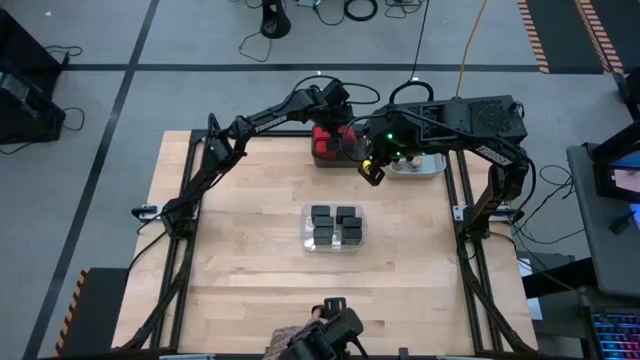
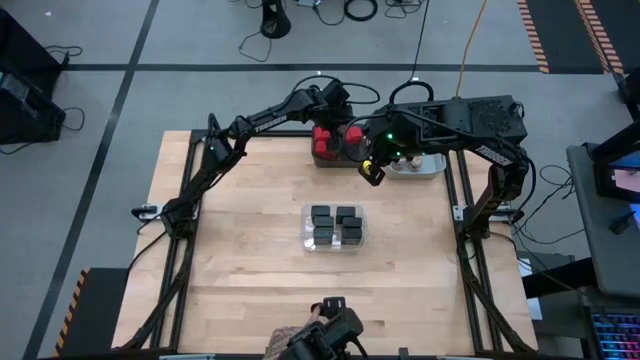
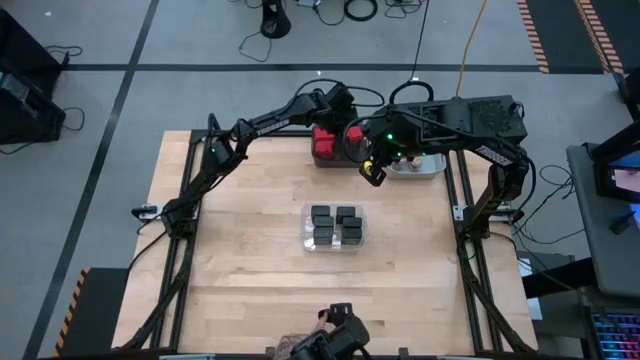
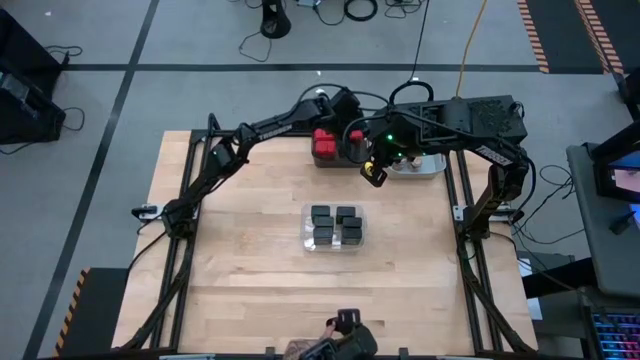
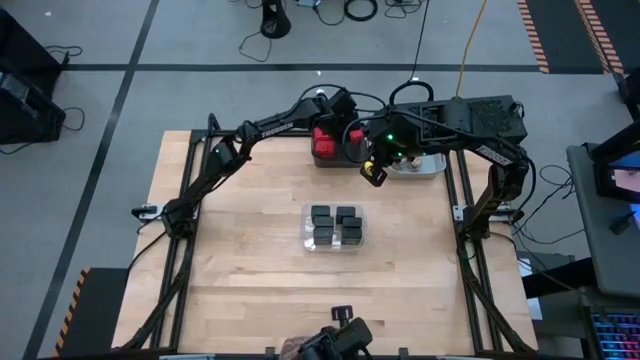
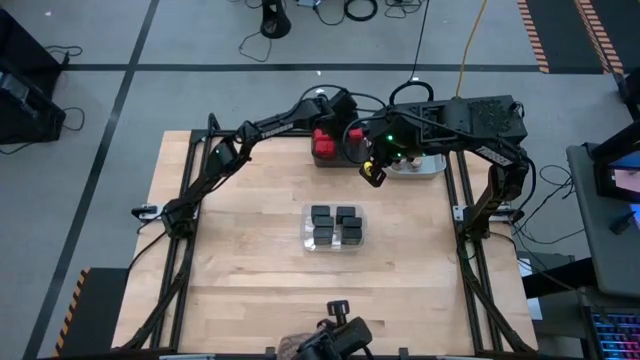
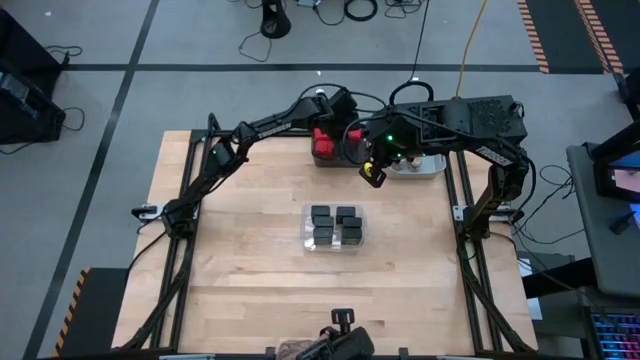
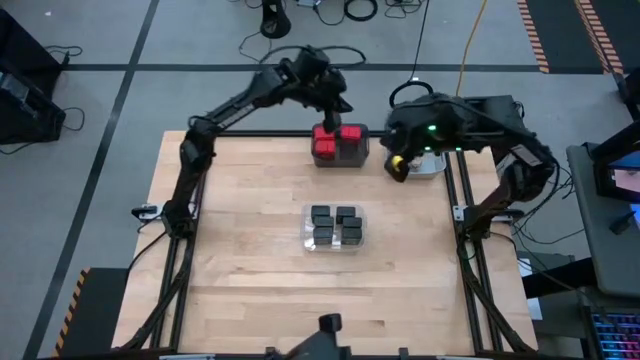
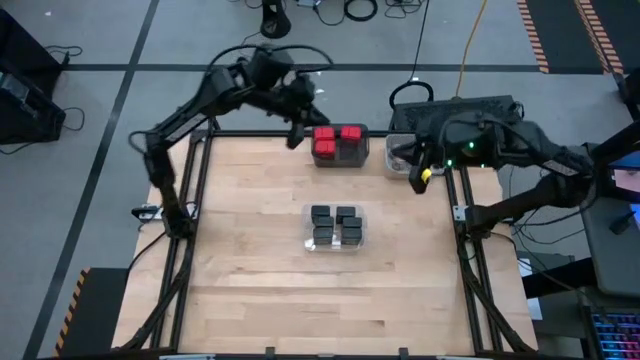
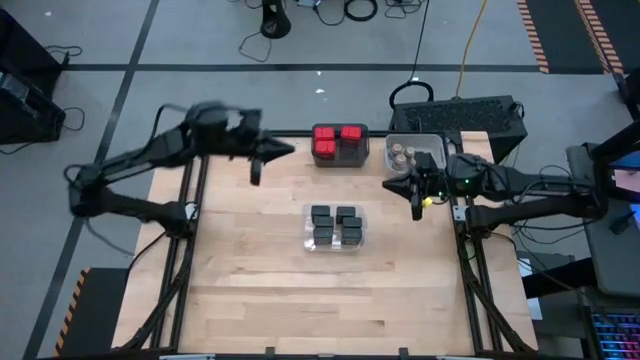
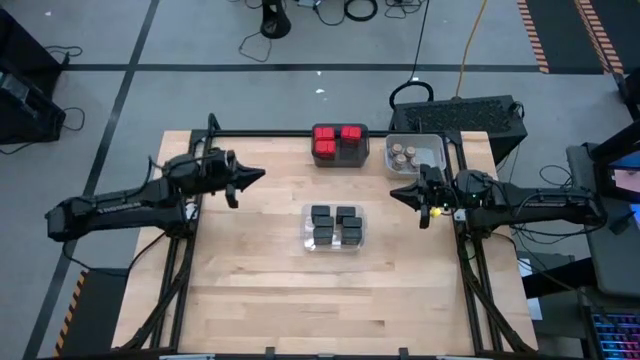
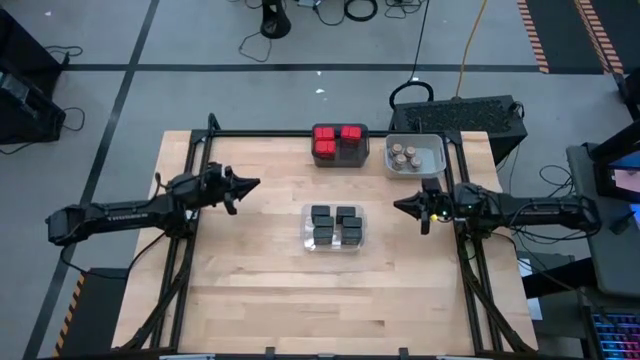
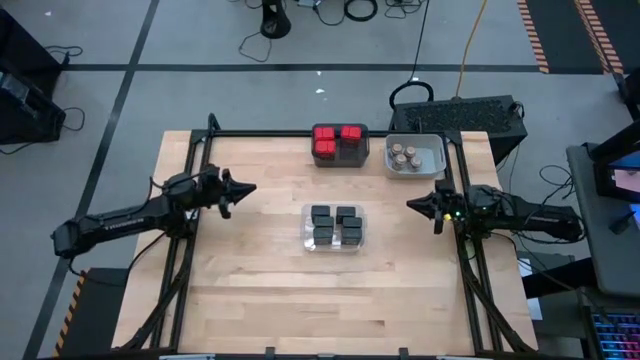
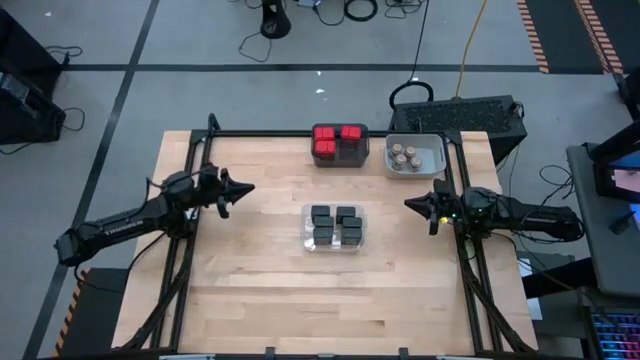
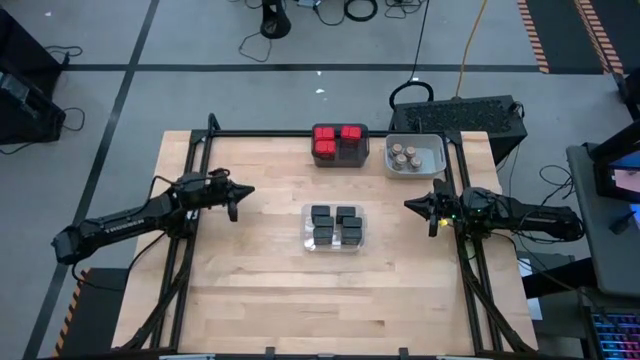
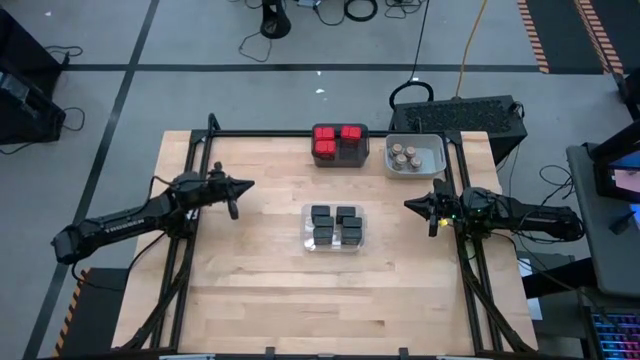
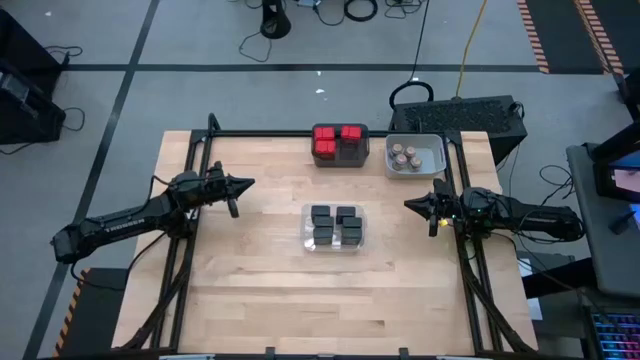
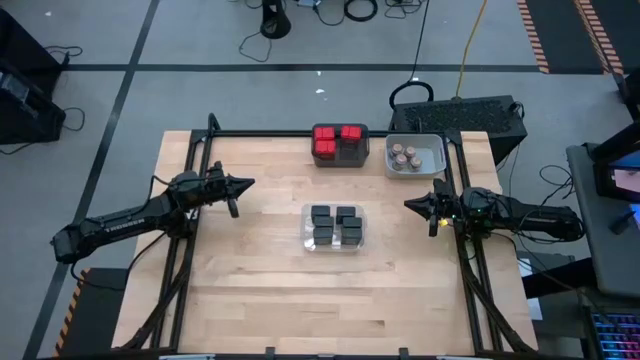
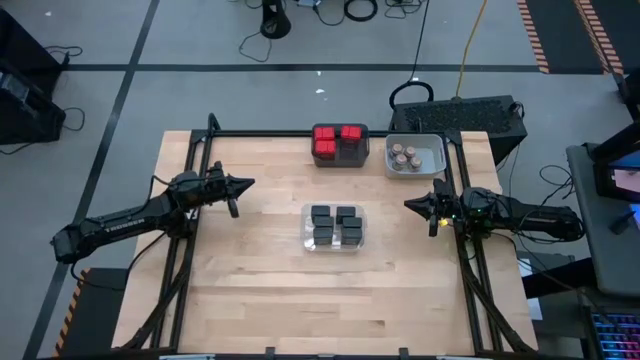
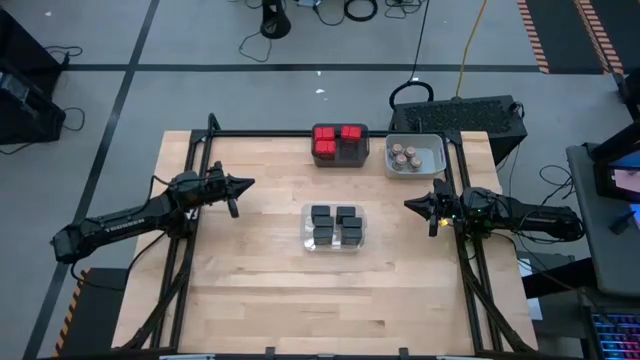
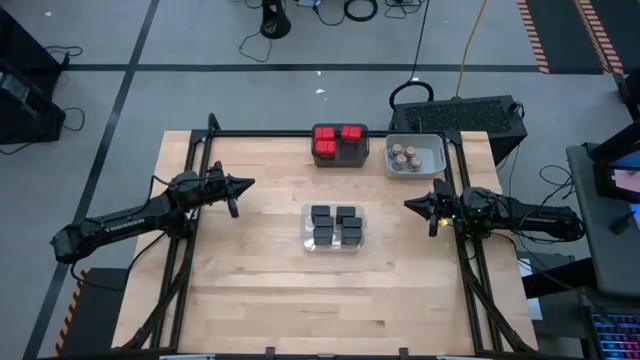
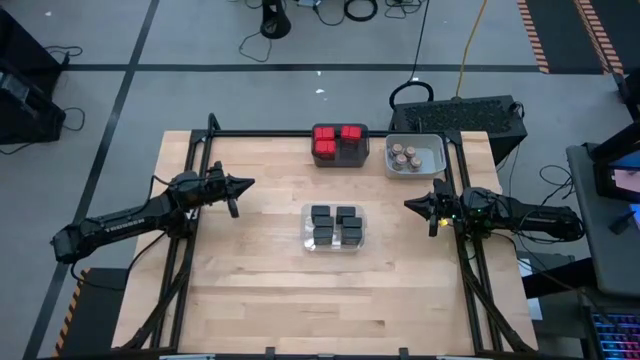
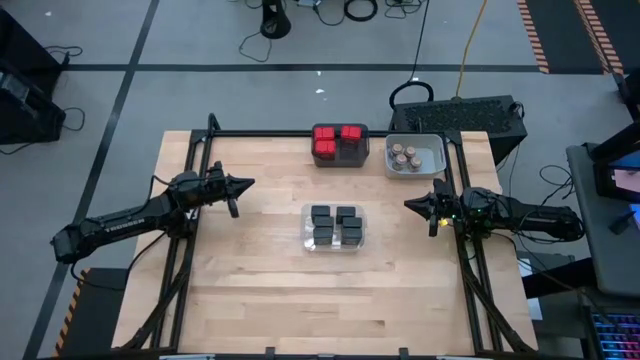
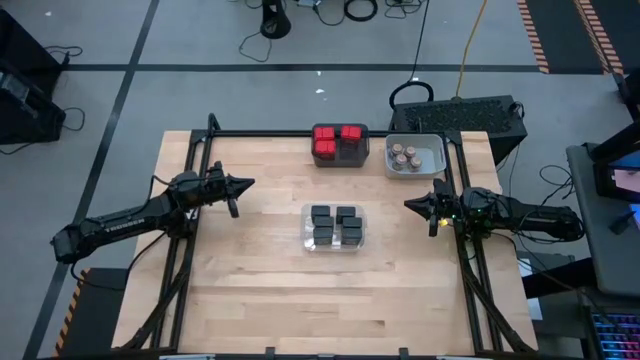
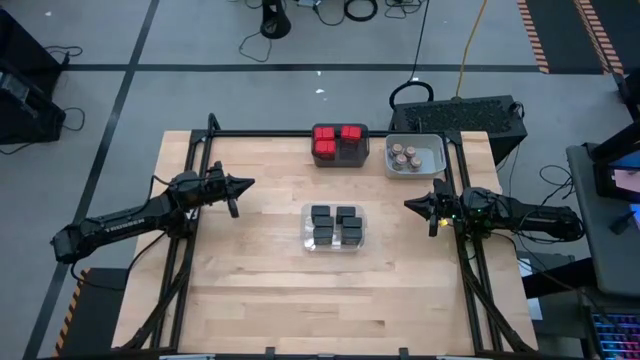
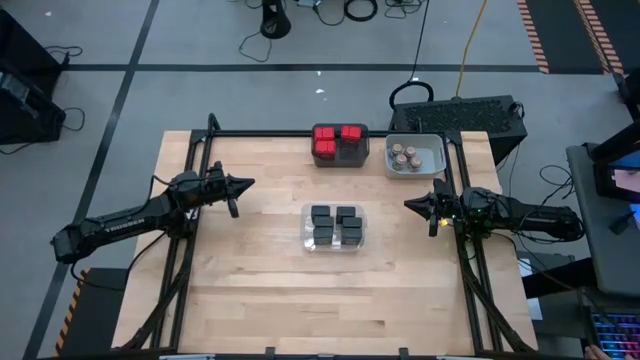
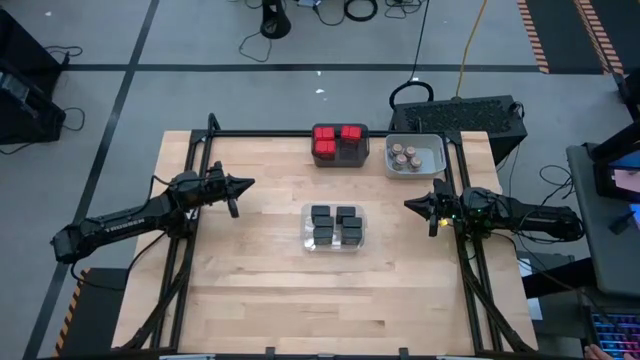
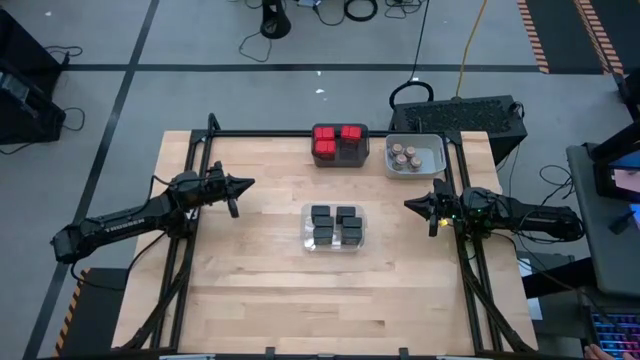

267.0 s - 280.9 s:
Task: Sort spices by type
Return to Home Position

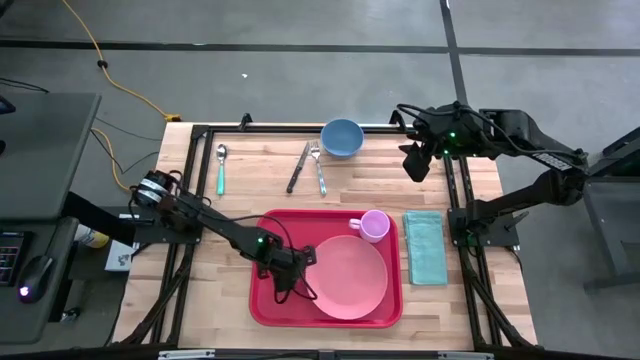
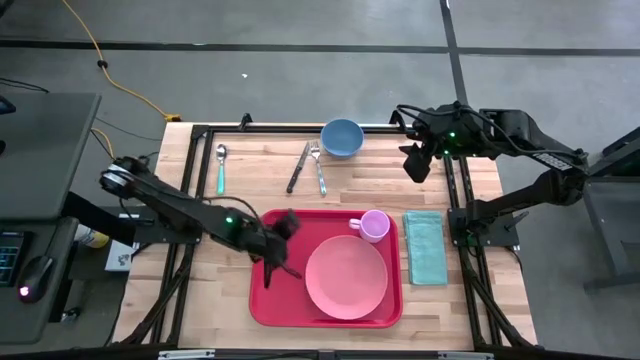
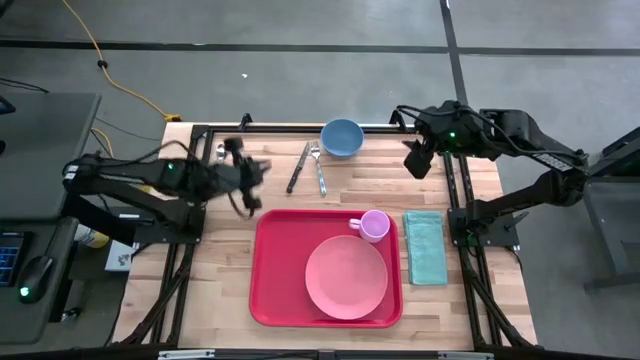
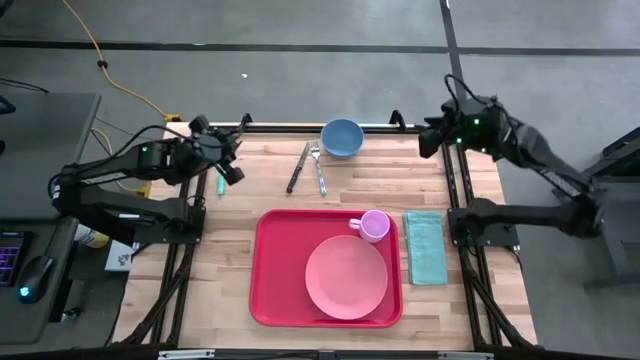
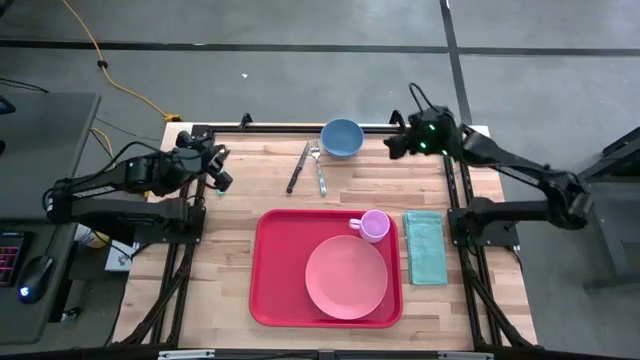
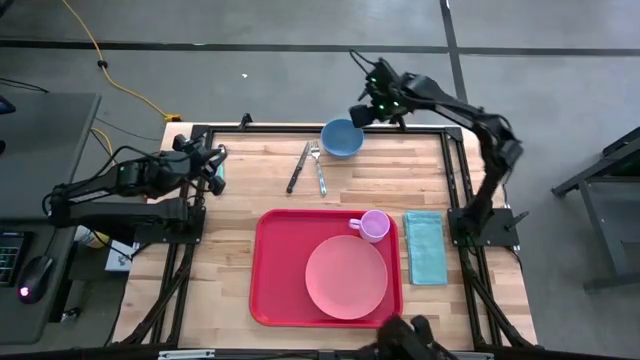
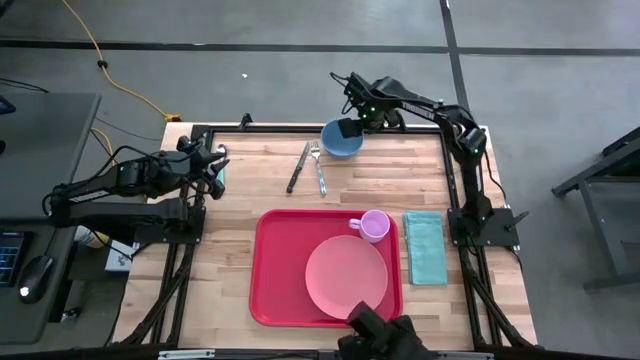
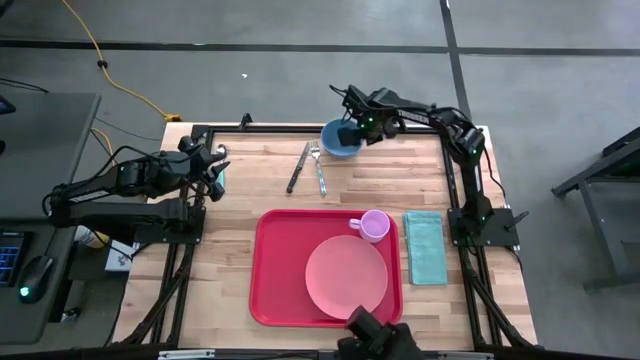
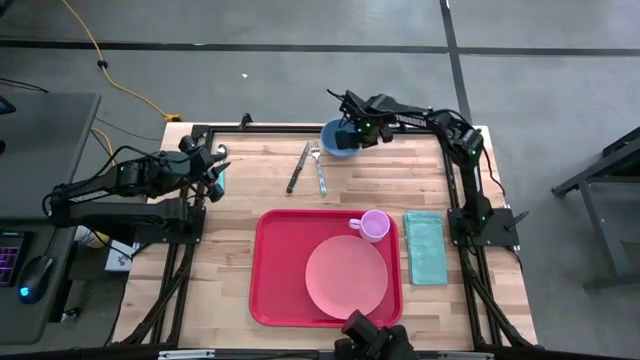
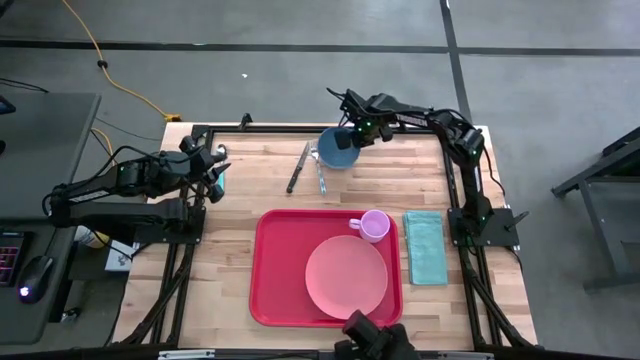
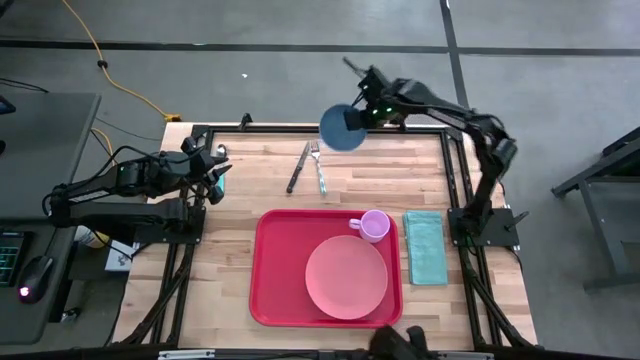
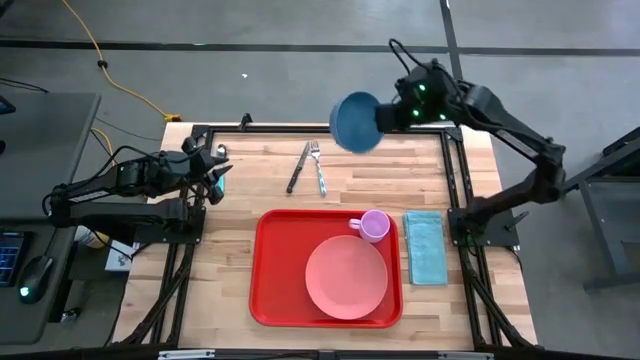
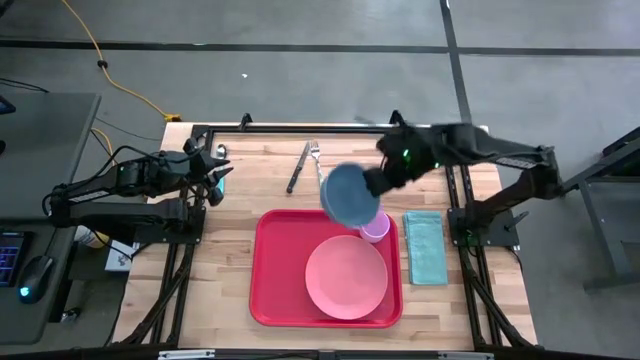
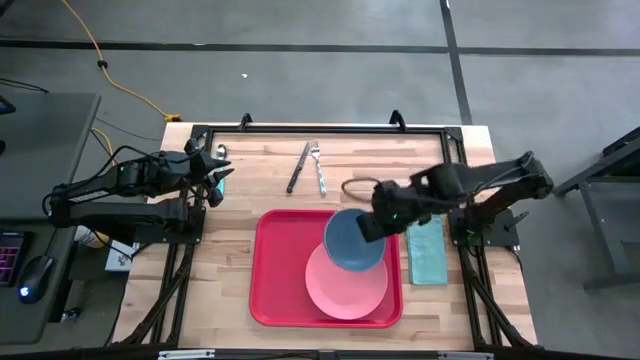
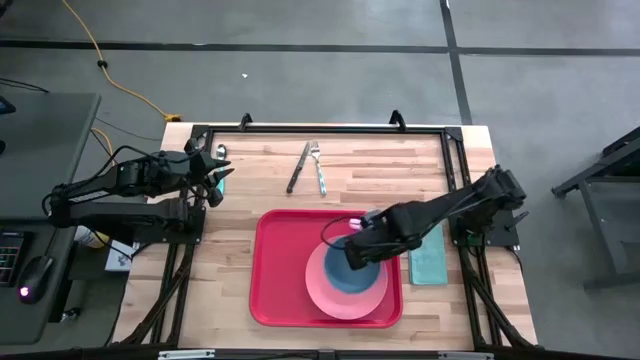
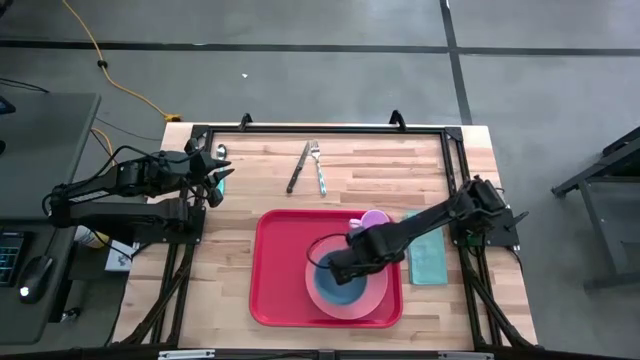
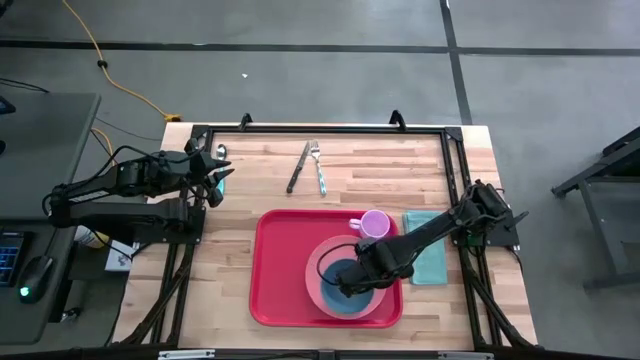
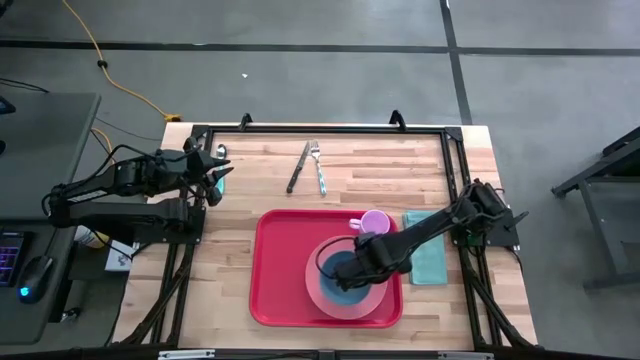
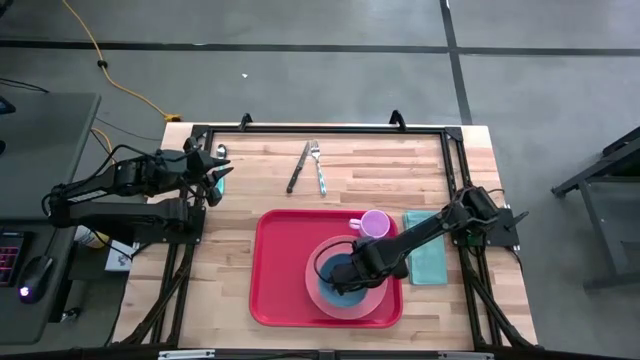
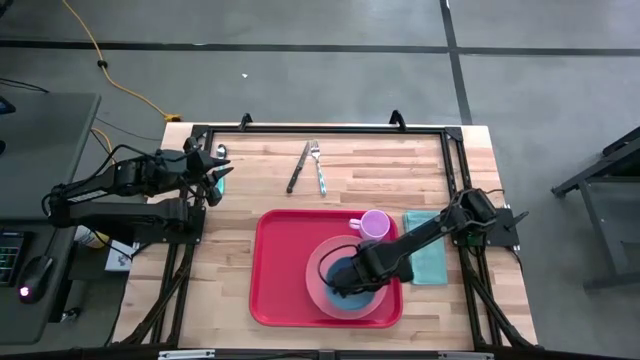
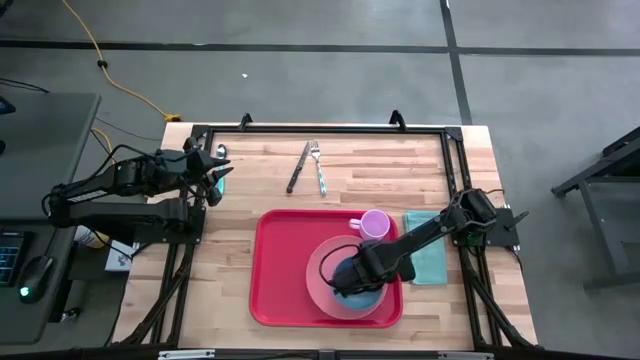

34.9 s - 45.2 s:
Task: Set up tray
Put the blue bowl on top of the pink plate on the red tray
